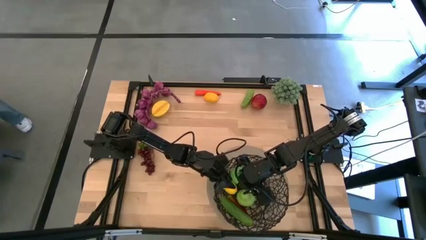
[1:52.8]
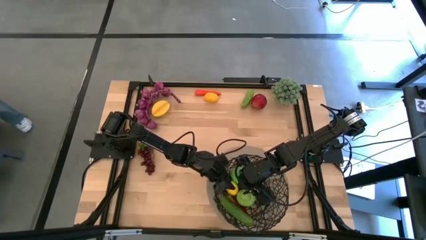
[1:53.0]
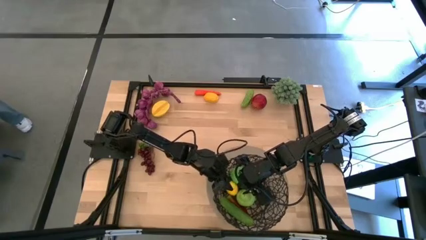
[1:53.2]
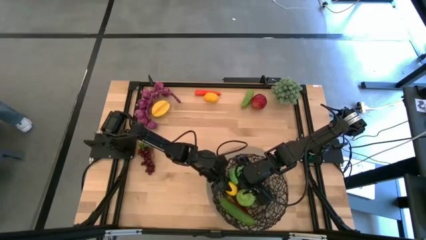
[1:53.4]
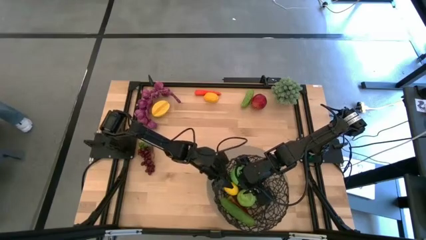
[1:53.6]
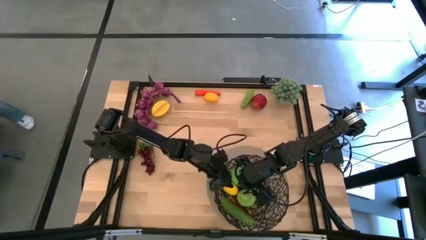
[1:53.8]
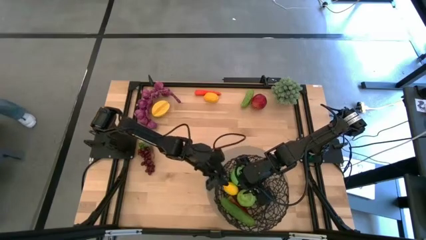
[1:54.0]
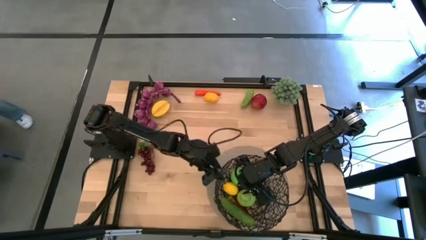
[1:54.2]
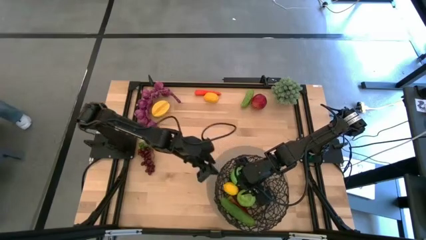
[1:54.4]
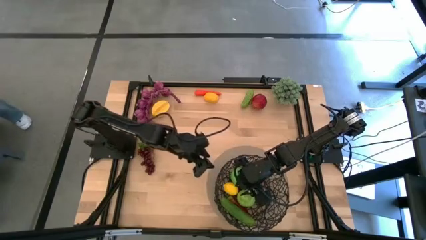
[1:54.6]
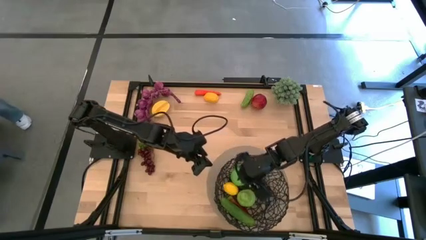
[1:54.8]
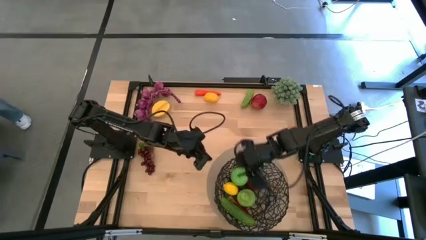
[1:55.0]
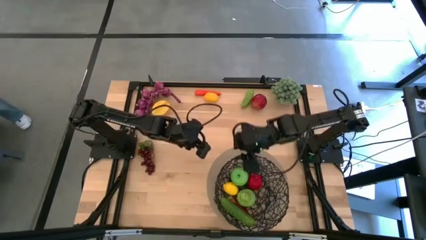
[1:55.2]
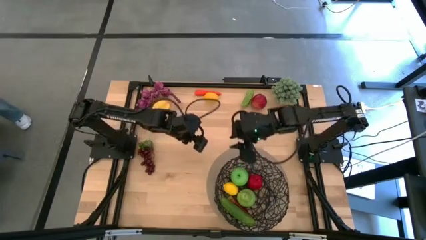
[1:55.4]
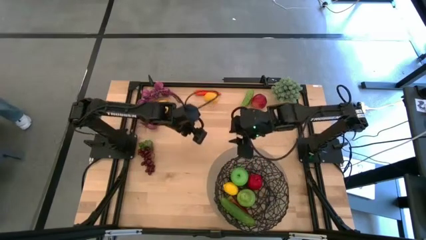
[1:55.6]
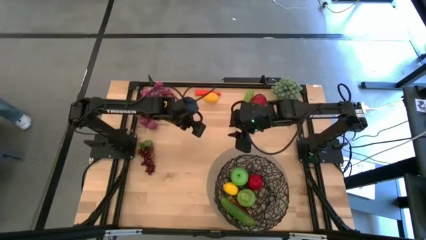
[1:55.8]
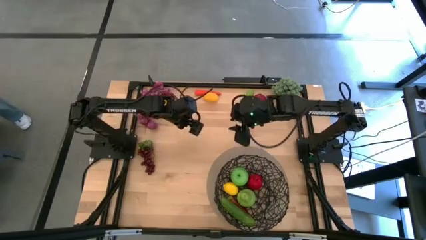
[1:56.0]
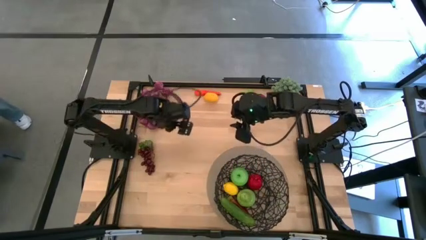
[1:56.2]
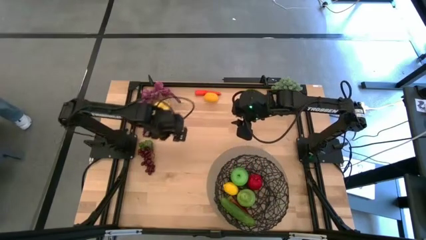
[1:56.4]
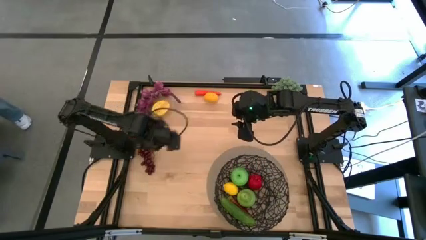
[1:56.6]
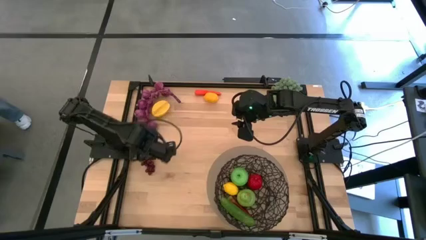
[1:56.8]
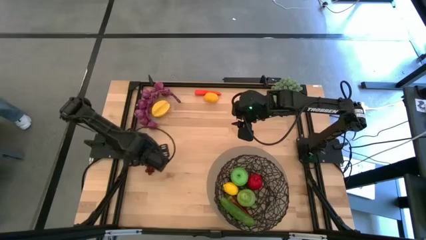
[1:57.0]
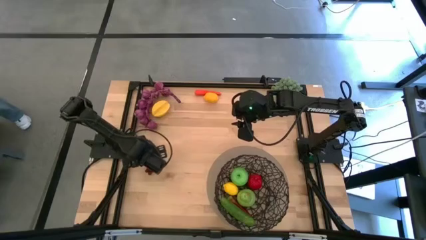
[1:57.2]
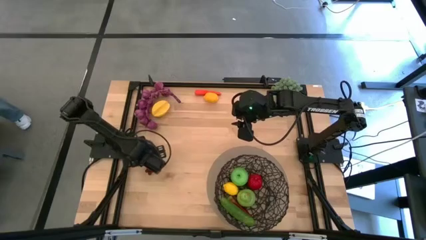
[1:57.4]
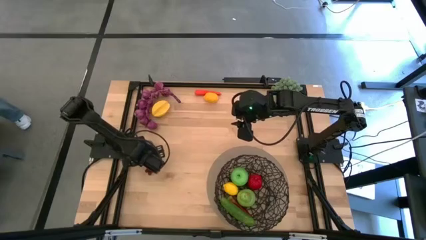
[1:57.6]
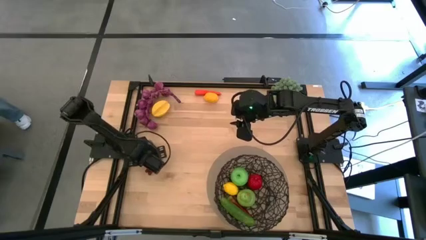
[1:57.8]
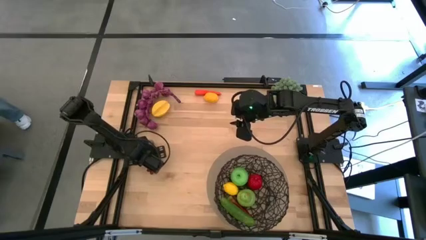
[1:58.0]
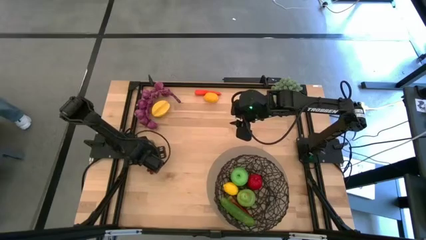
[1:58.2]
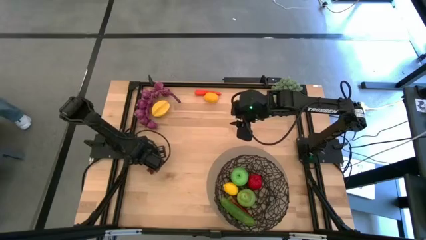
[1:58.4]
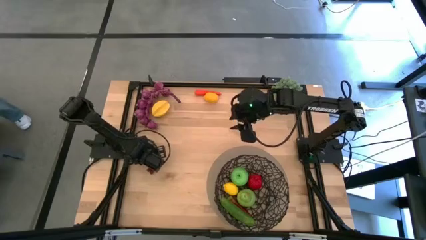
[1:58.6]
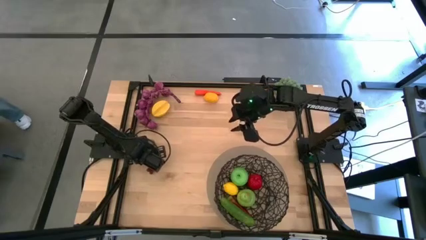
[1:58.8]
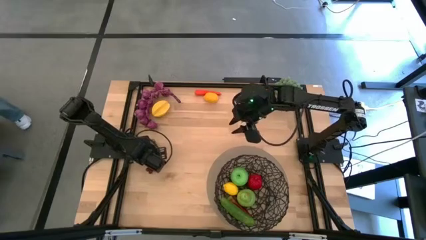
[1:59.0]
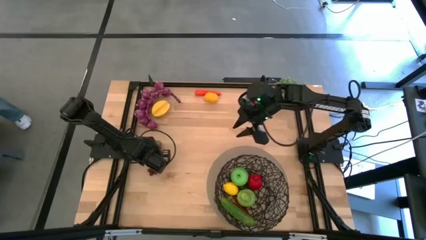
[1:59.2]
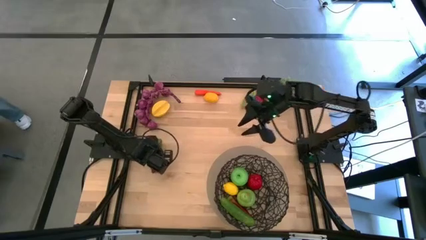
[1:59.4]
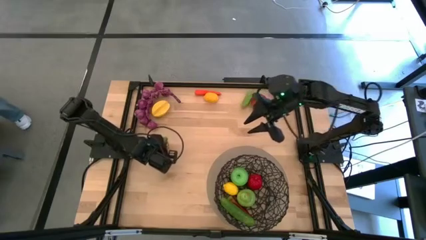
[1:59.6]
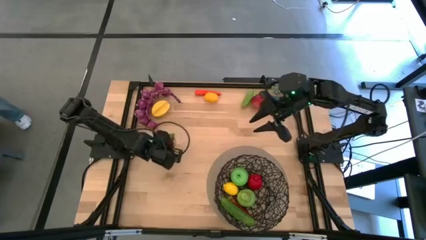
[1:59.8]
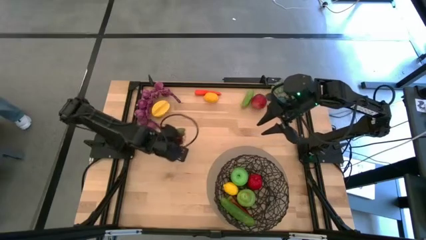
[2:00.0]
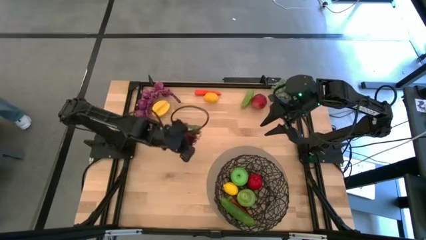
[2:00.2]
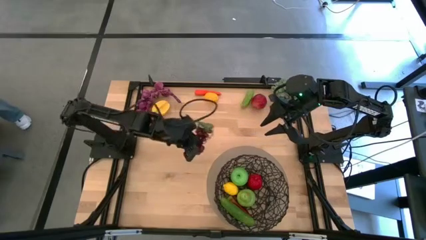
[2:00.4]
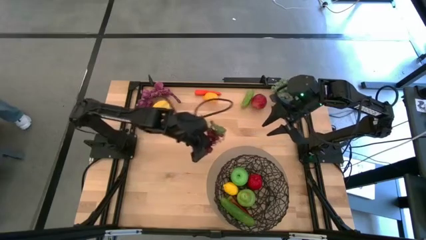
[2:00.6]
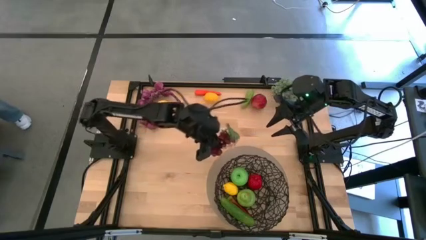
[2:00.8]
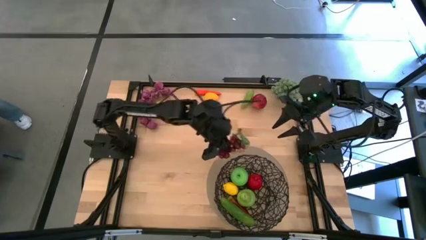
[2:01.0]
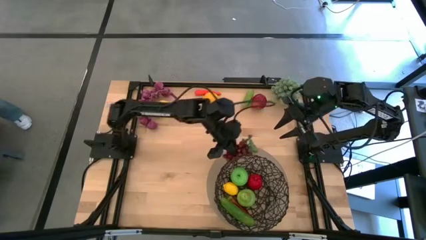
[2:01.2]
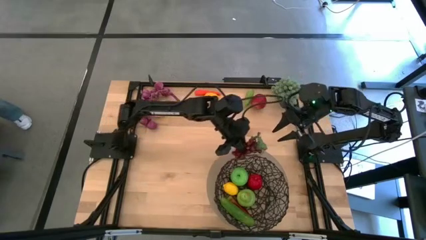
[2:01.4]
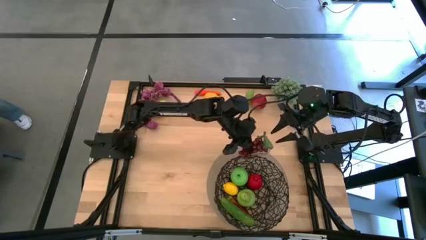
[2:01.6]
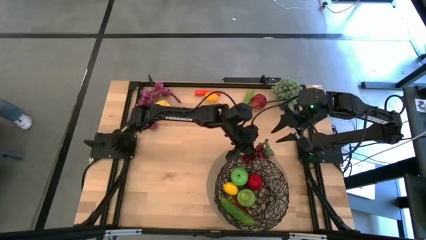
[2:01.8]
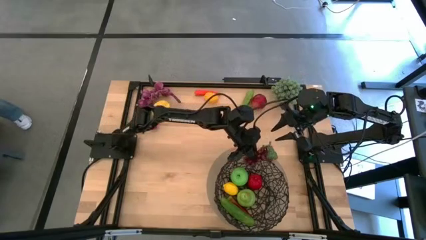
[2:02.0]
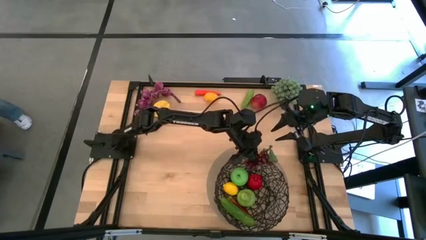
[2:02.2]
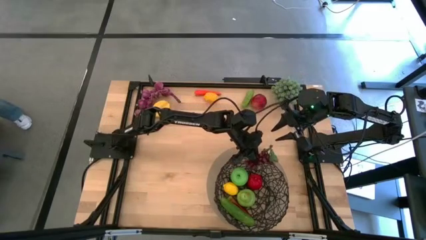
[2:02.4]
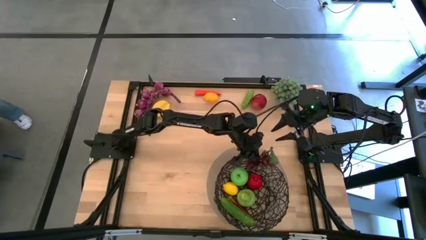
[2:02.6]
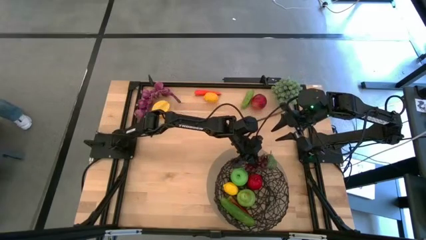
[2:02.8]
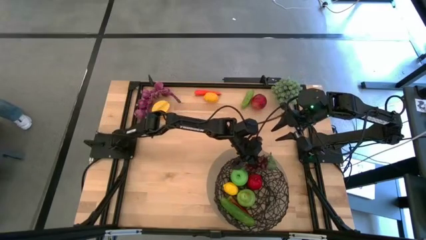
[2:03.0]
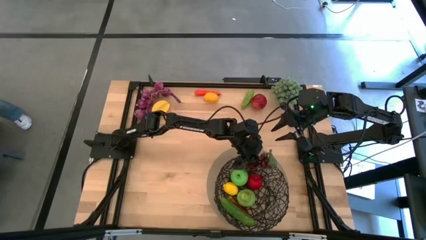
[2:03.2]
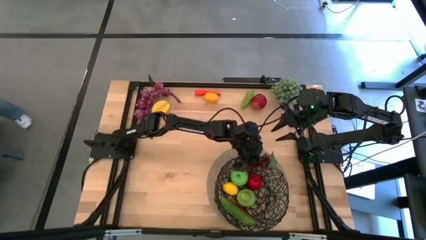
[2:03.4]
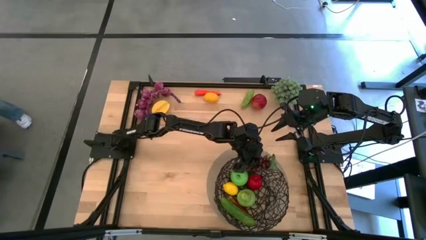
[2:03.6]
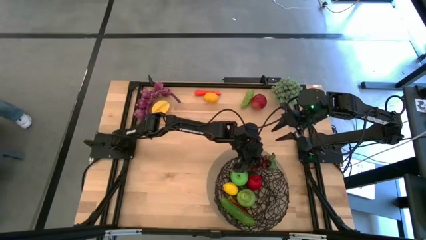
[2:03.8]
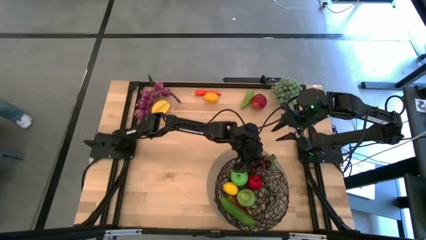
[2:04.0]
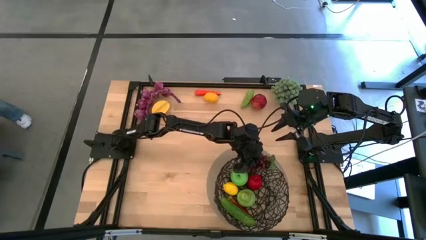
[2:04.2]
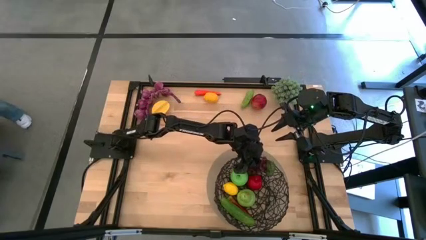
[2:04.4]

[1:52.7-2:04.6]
Task: Build produce basket
Put the violet grapes into the wire basket

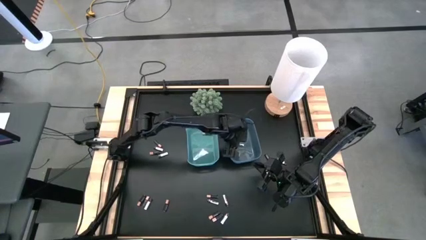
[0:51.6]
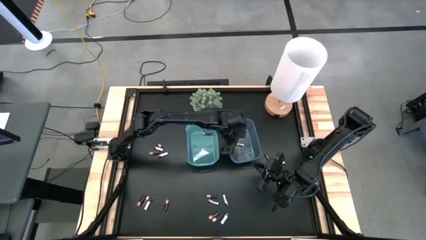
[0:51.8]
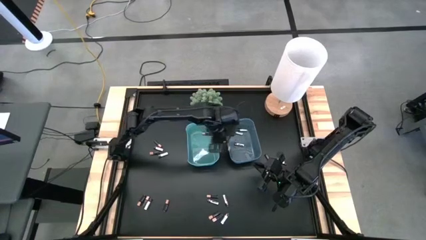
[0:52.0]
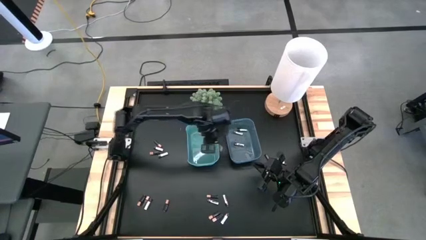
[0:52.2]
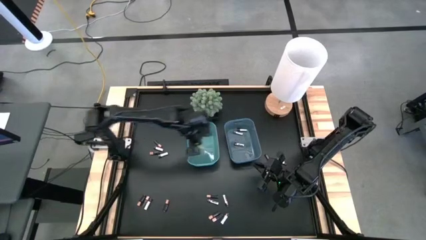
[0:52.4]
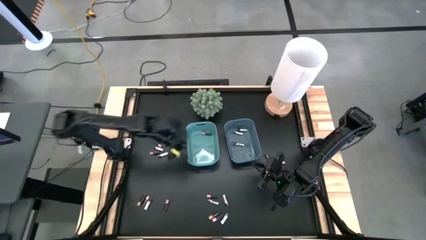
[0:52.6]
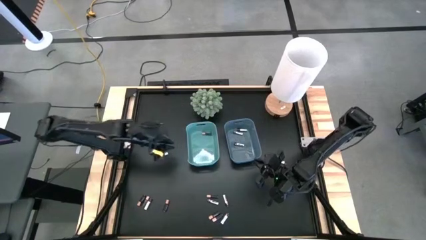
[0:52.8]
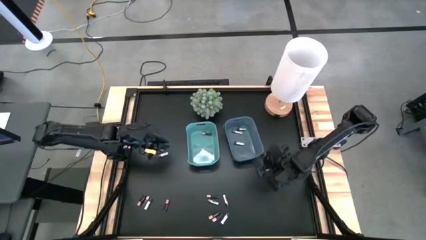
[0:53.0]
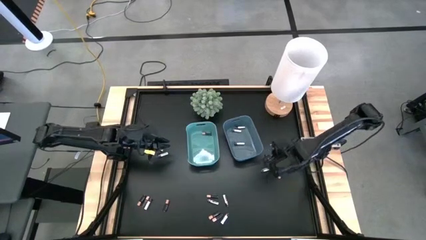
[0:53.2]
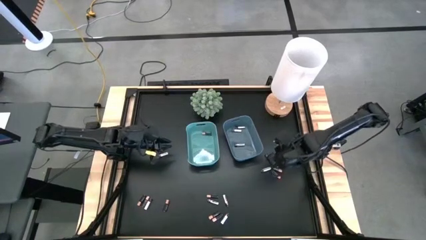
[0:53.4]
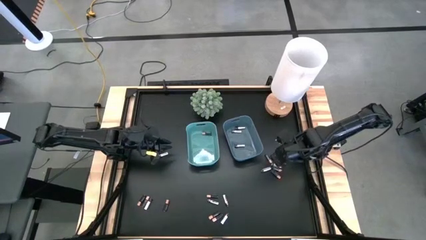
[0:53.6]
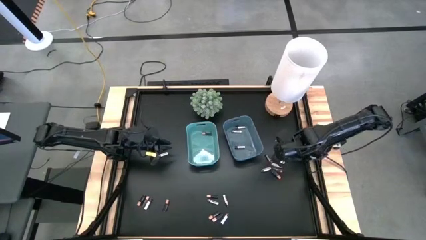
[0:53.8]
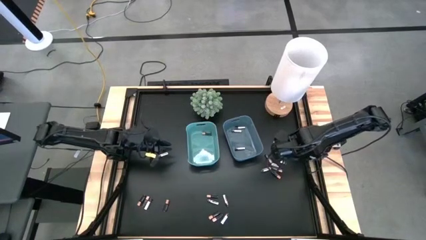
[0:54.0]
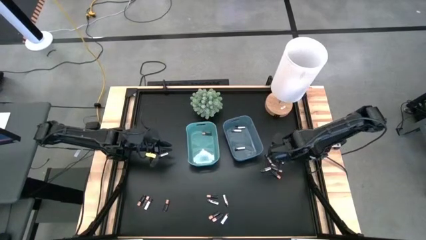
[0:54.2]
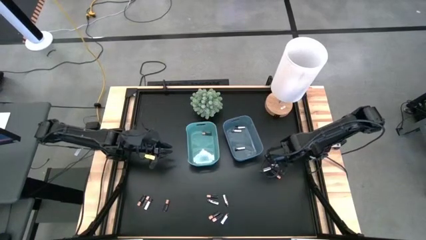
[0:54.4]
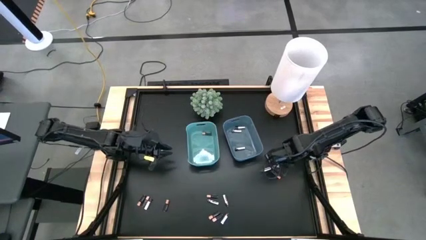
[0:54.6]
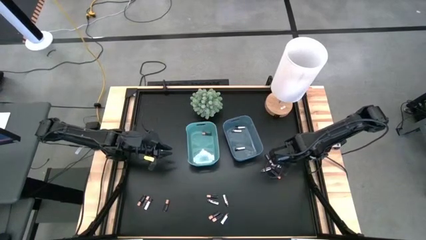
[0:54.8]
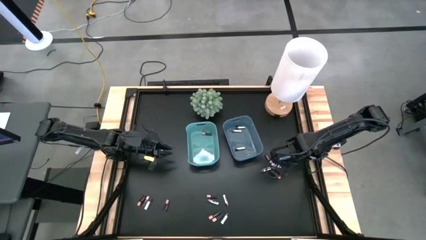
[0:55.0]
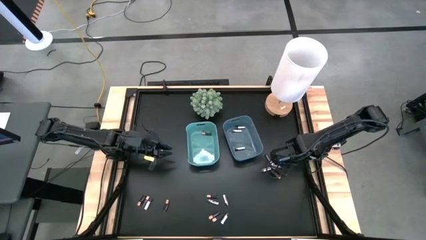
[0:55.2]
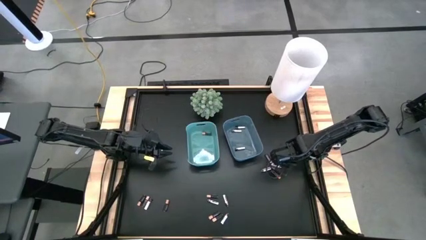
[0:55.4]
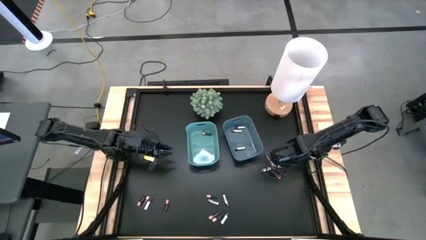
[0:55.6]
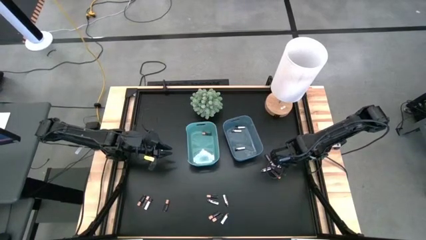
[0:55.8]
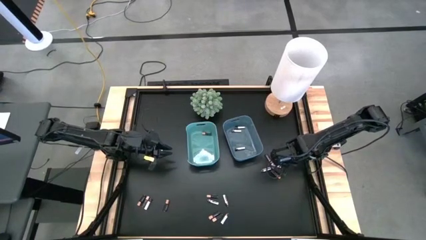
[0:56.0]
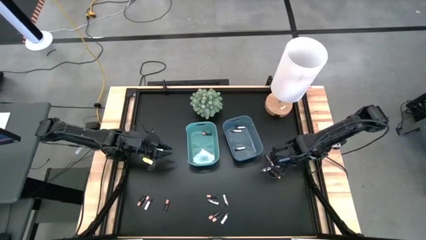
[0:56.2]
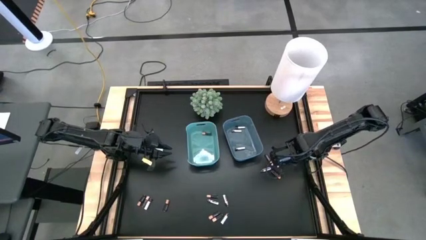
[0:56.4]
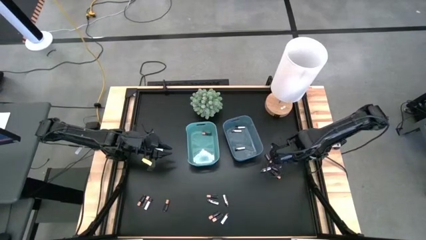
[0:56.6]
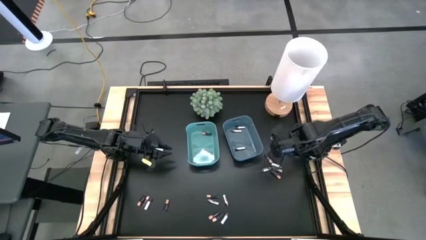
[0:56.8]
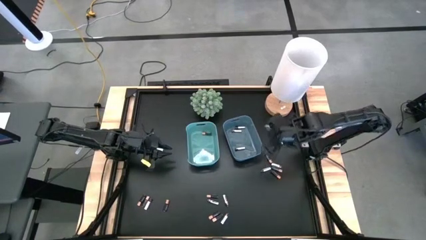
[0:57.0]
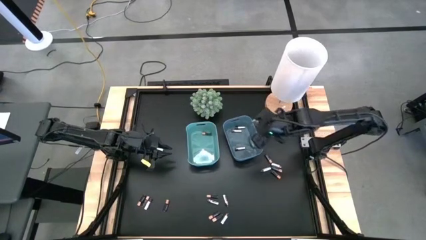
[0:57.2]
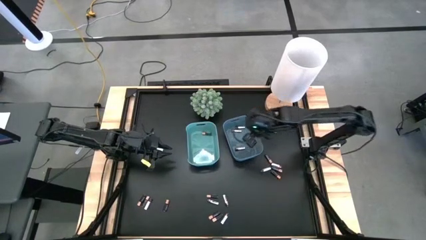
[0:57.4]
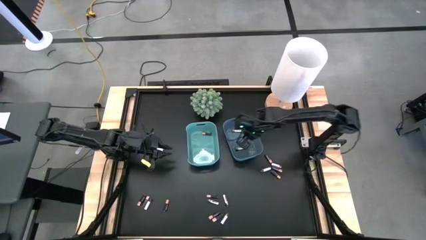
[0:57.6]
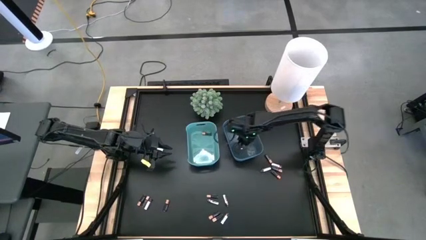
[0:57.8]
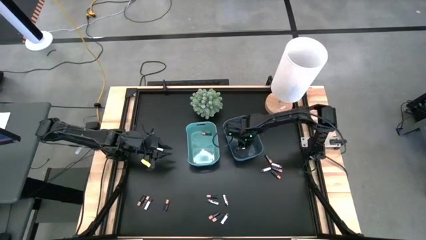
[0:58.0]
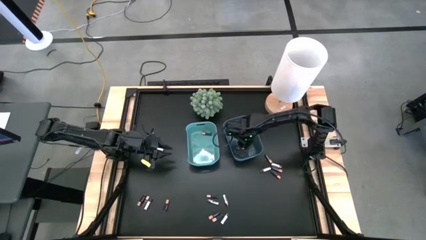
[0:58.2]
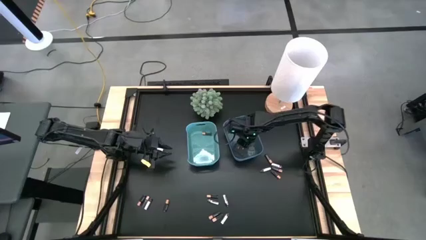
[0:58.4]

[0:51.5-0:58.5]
Task: Sort batteries
Put the white battery into the blue bin
